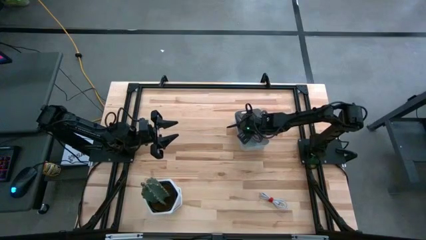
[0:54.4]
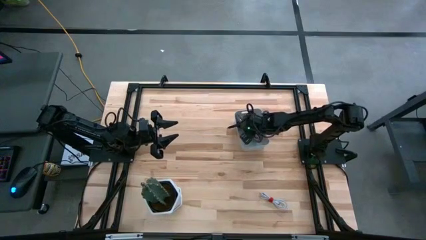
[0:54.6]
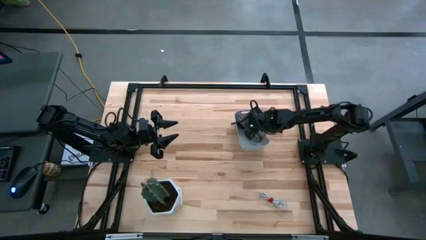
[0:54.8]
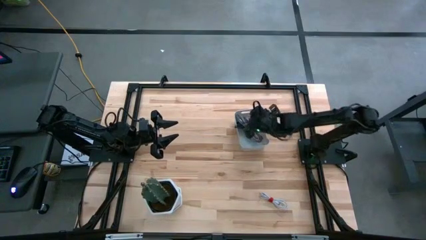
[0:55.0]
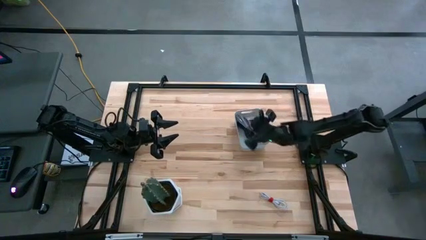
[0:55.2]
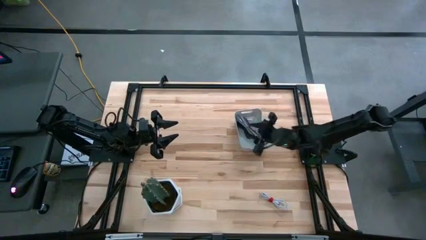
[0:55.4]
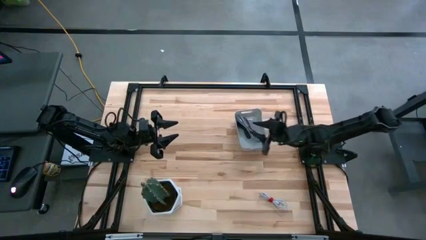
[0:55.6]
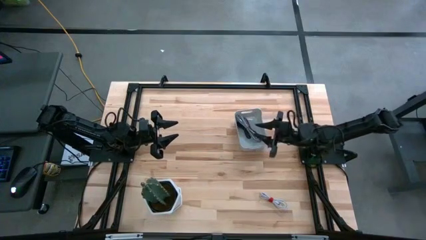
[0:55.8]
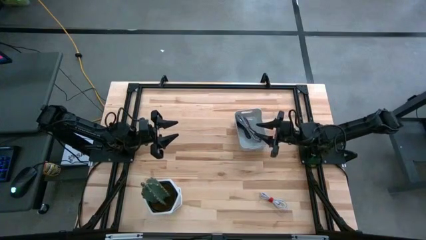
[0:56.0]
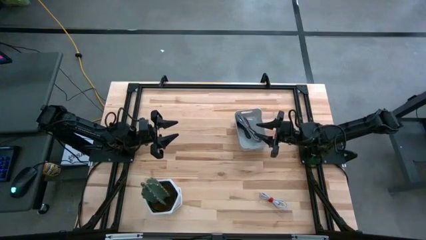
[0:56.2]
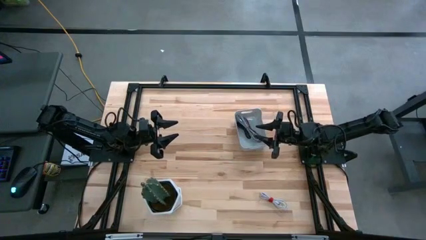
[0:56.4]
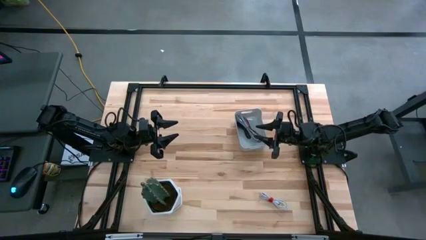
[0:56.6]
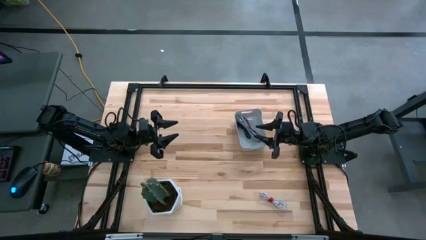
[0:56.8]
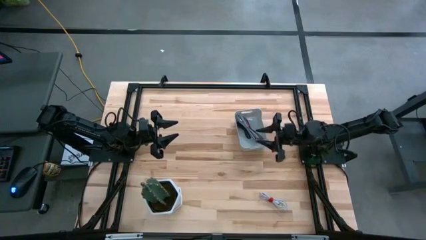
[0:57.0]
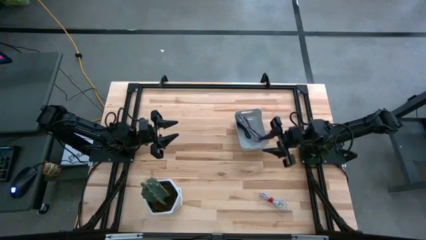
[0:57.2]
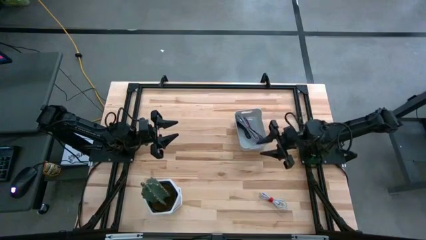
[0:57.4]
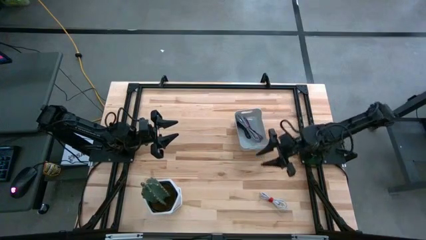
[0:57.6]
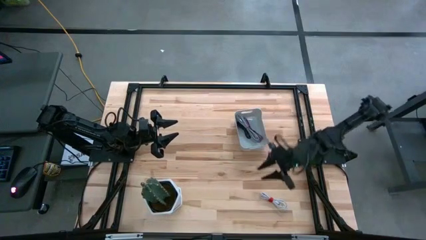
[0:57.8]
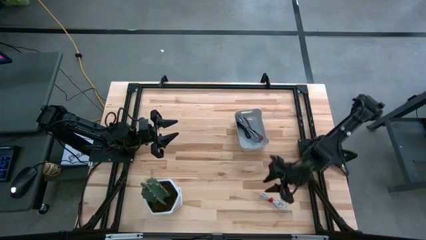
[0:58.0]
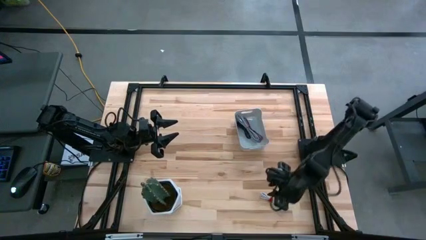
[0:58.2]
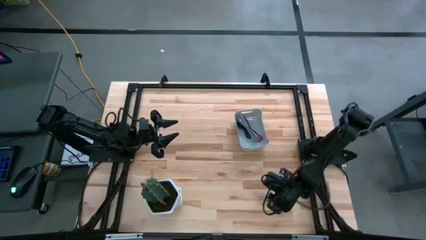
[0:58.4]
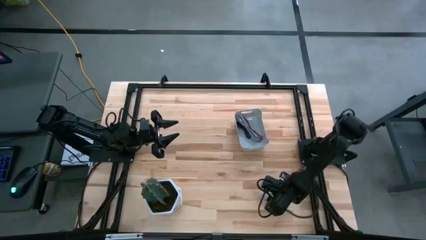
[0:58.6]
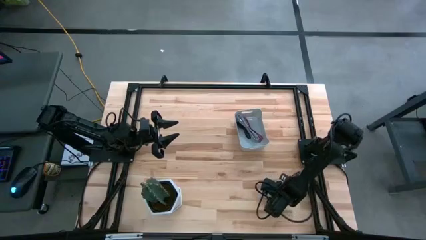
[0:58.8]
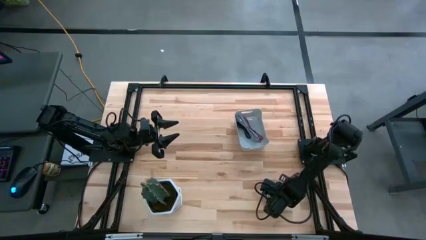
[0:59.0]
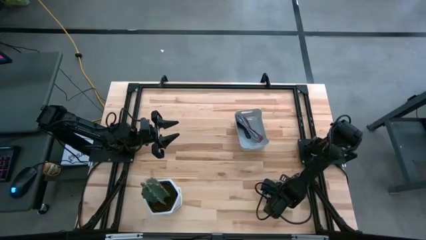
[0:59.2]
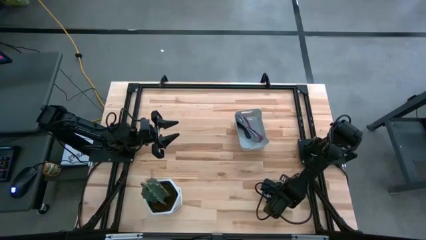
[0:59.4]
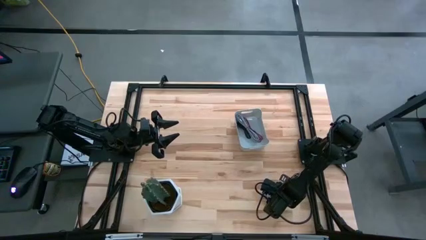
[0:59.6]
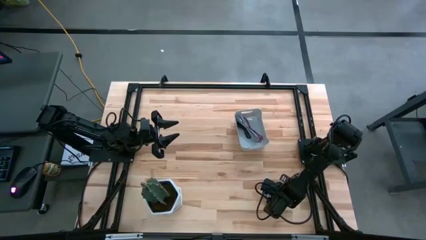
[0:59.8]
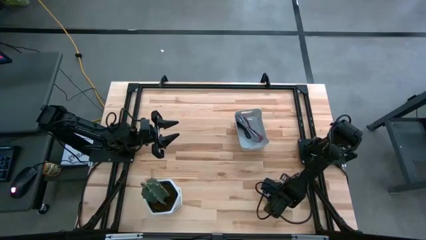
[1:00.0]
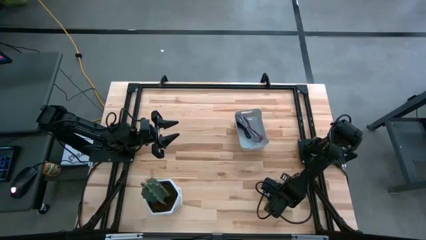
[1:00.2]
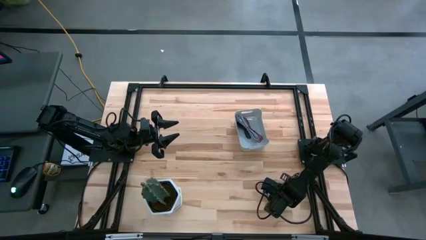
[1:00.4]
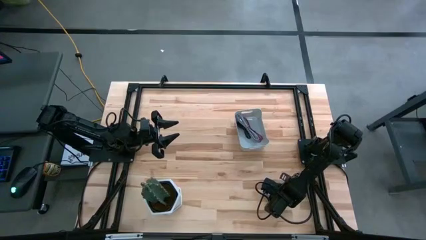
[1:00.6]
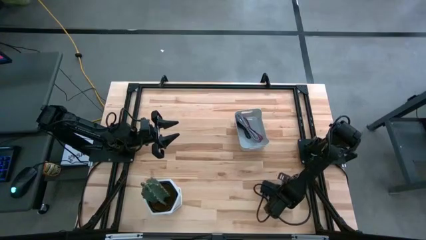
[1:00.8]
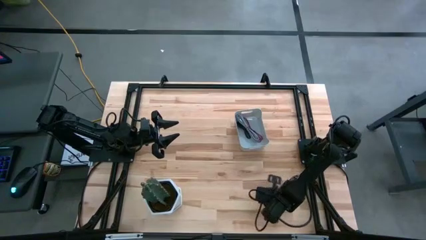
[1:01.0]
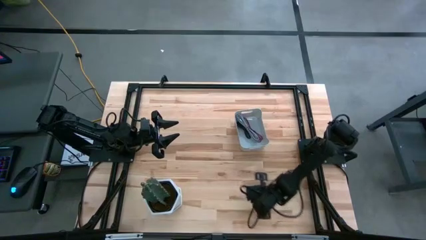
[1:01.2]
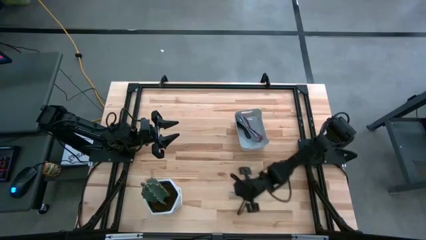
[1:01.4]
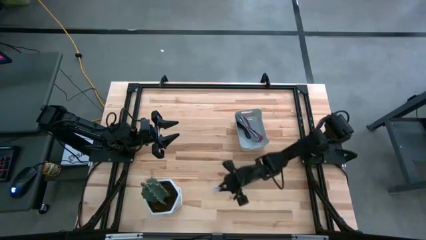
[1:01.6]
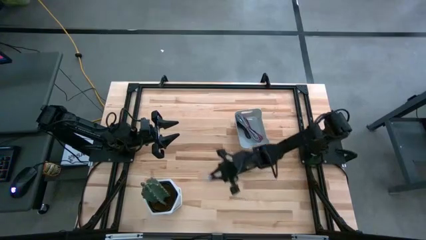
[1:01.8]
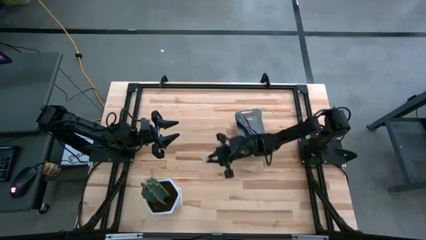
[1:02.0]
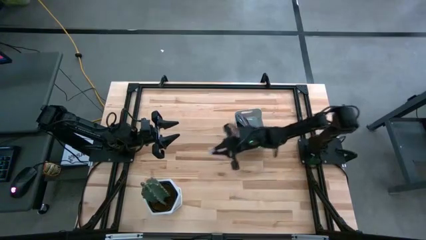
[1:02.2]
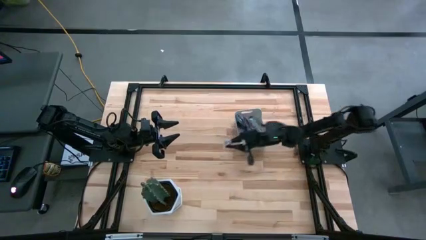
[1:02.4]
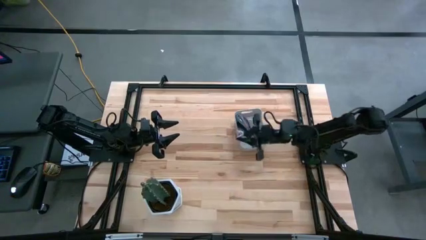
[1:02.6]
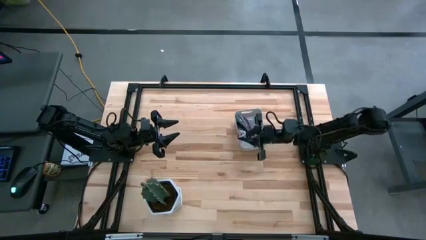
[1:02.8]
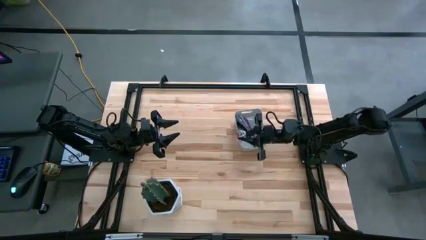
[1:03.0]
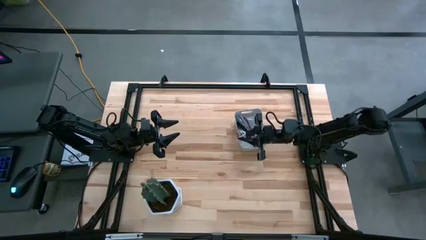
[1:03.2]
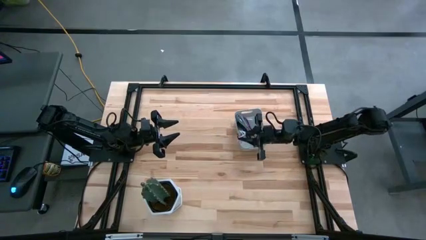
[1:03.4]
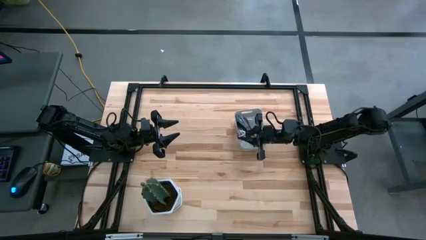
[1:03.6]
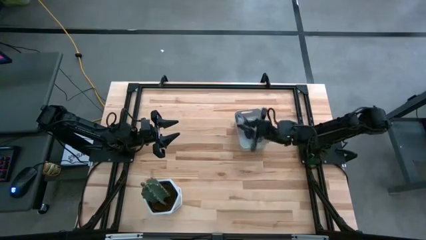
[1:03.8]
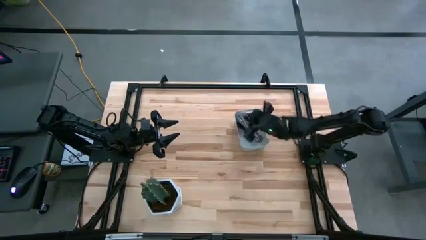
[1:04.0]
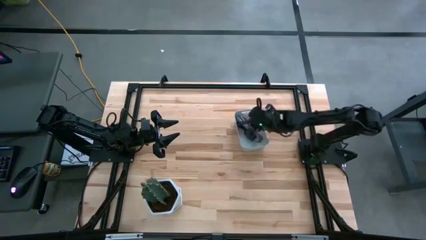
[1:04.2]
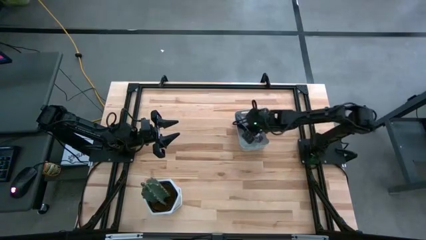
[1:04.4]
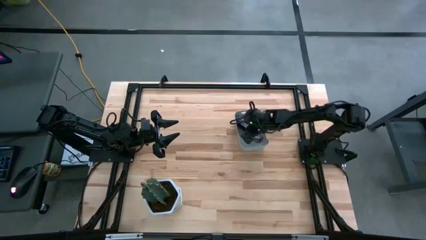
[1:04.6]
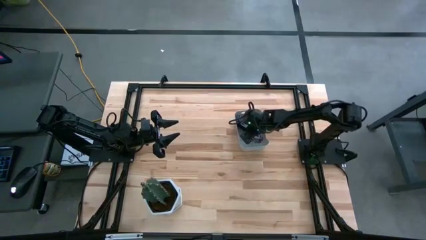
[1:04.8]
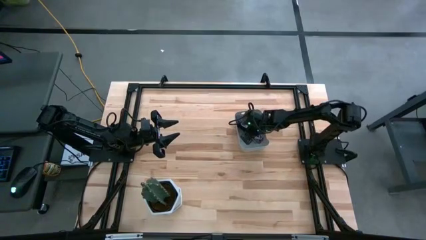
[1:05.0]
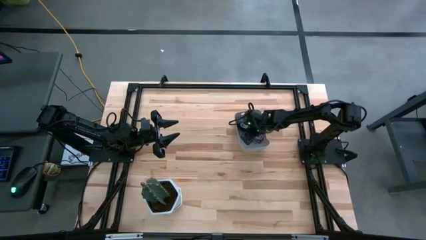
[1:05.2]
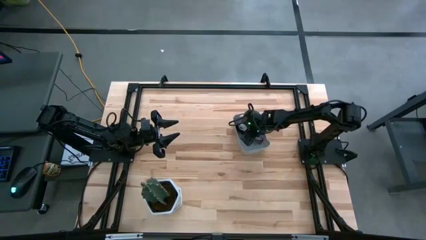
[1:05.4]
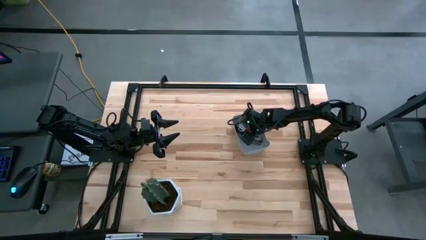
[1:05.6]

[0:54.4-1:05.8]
Task: Pick and place USB-C Cables
Put the white charger cable into the gray bin

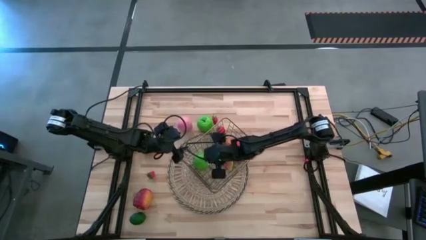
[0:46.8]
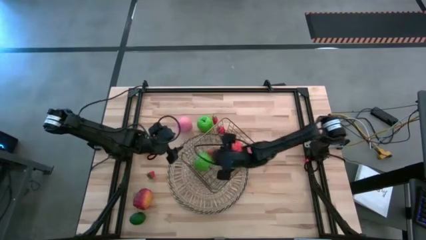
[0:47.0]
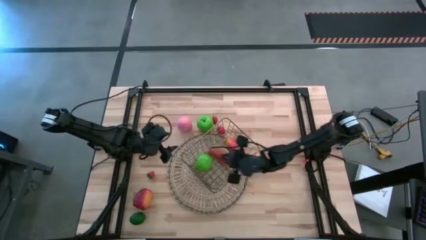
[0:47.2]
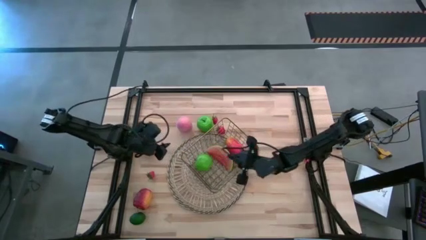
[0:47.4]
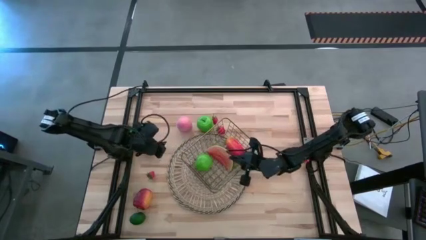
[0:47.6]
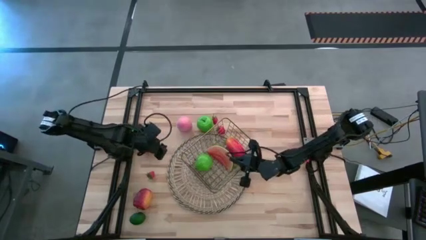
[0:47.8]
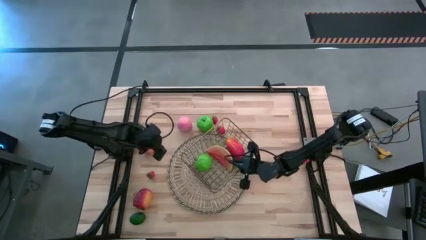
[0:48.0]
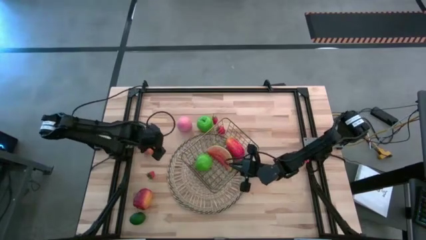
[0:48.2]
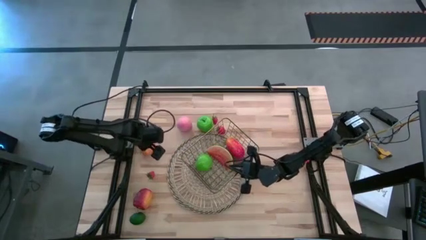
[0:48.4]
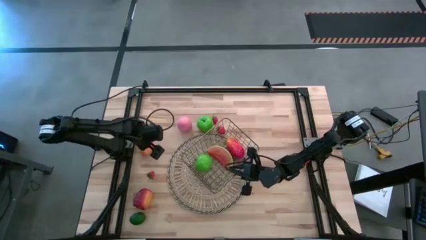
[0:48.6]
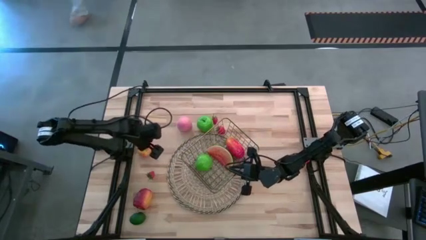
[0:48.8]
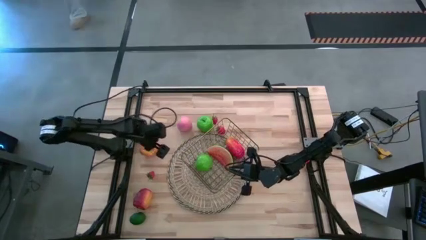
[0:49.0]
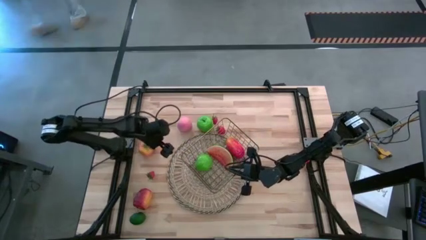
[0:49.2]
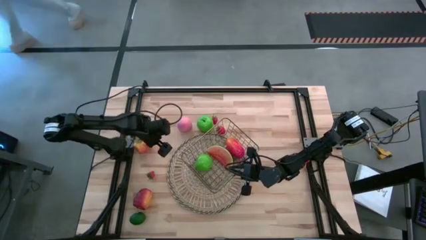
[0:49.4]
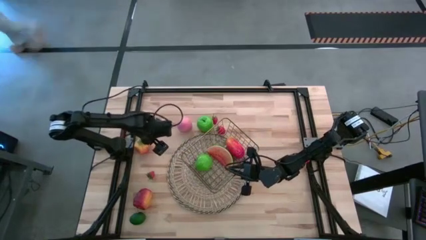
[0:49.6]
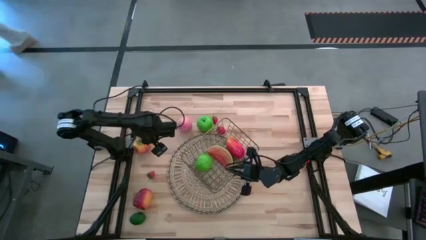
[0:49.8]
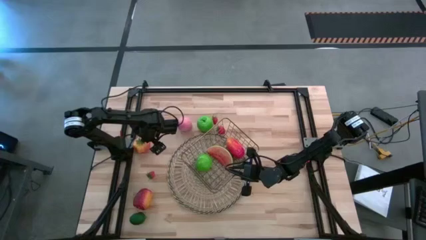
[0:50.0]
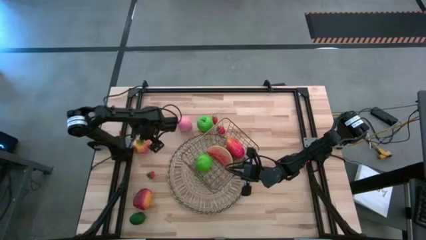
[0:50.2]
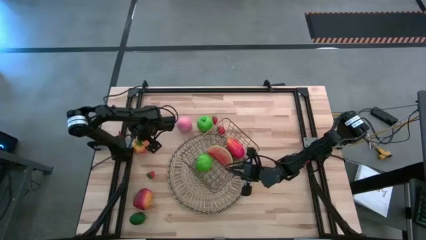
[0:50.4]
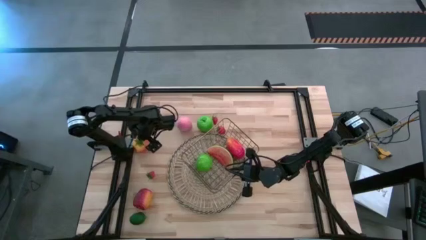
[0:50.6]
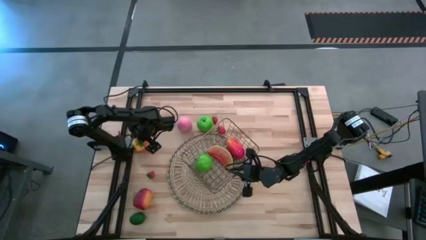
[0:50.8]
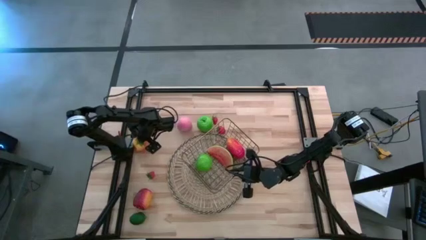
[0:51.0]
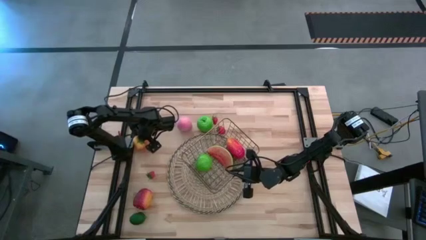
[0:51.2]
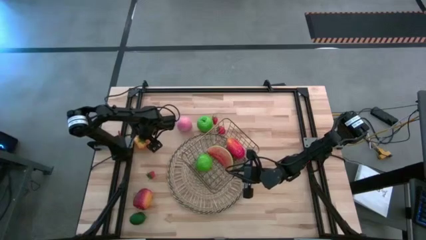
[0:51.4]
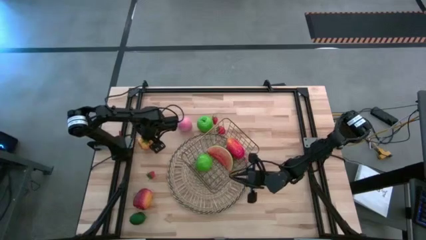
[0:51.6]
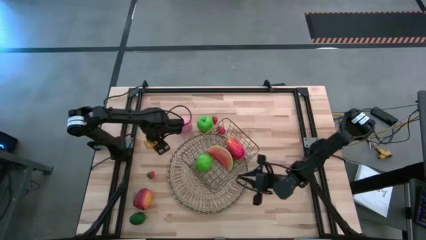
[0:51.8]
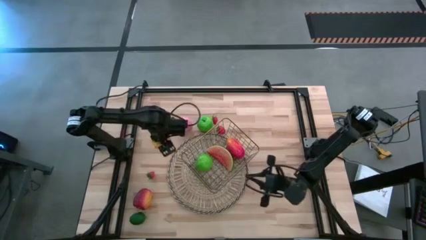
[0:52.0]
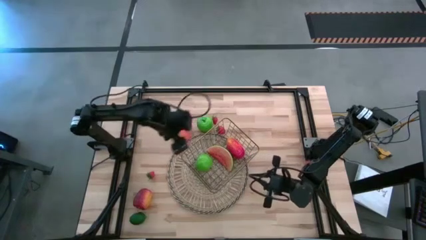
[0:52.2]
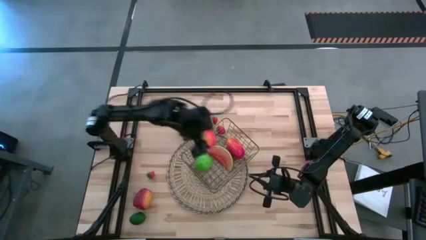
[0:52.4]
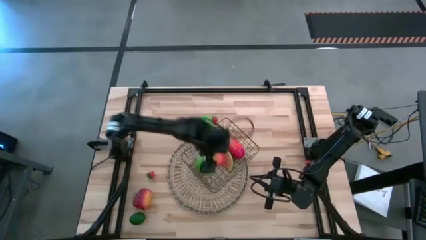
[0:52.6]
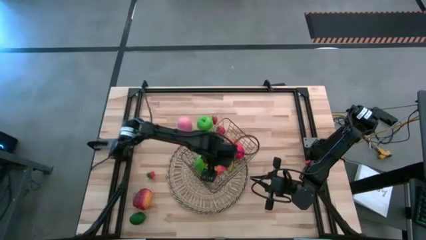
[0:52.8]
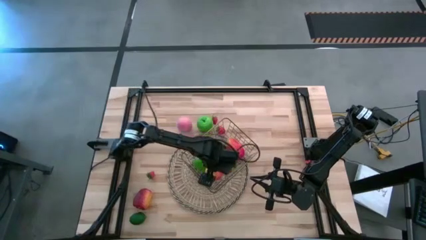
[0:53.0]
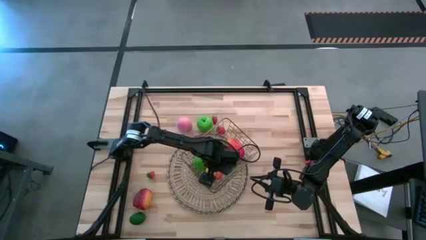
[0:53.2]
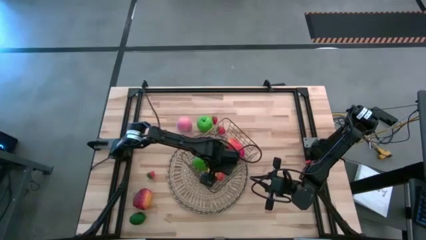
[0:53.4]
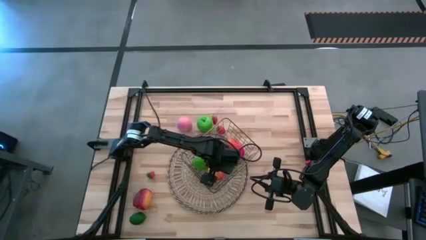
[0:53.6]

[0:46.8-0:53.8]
Task: Build produce basket
Put the tomato into the gold wire basket
